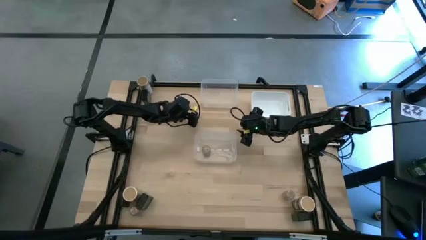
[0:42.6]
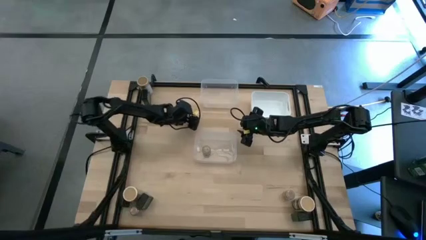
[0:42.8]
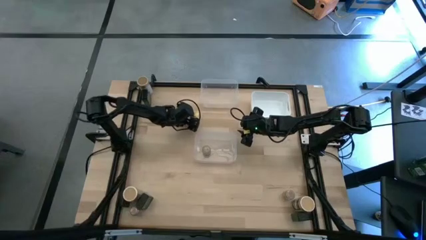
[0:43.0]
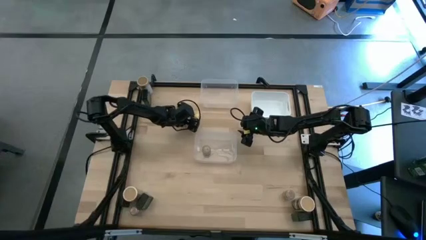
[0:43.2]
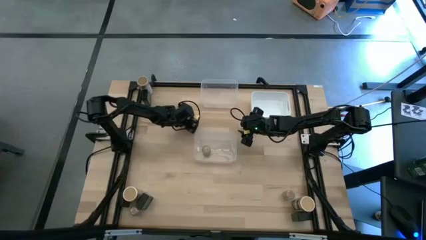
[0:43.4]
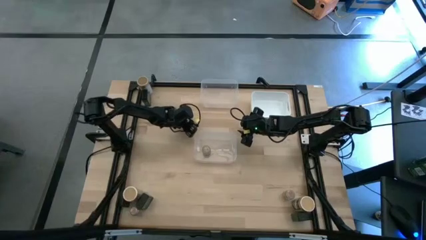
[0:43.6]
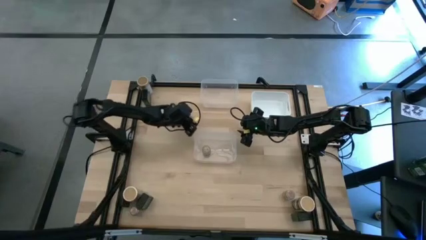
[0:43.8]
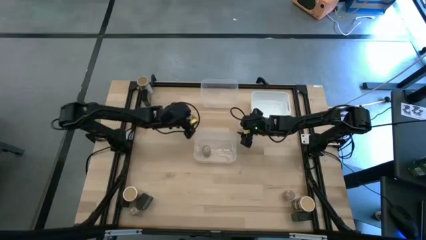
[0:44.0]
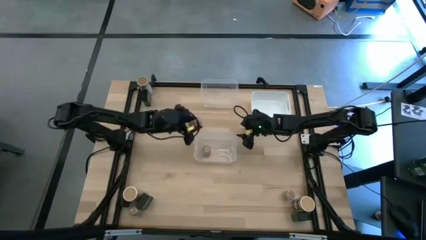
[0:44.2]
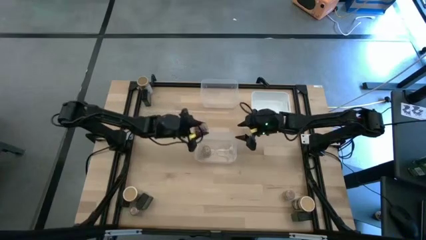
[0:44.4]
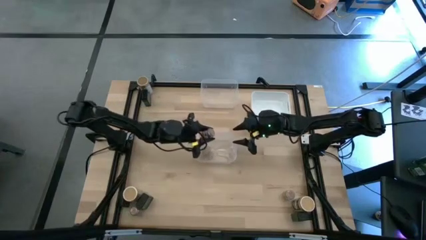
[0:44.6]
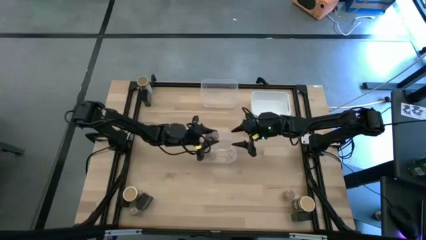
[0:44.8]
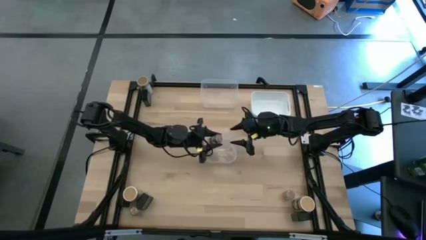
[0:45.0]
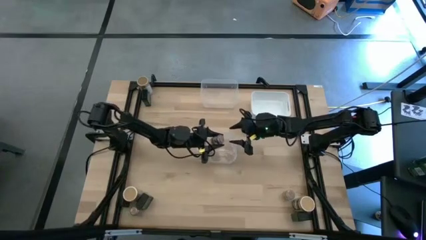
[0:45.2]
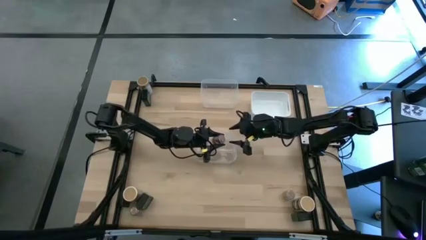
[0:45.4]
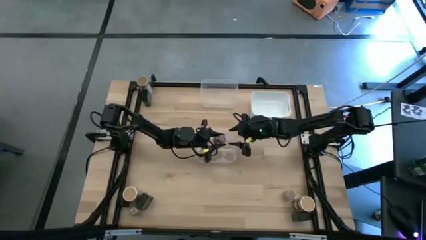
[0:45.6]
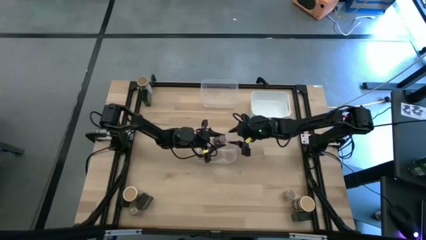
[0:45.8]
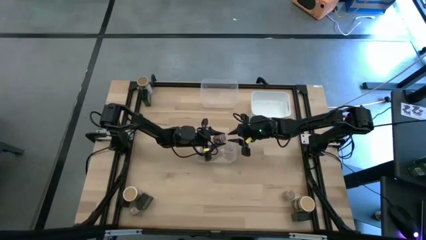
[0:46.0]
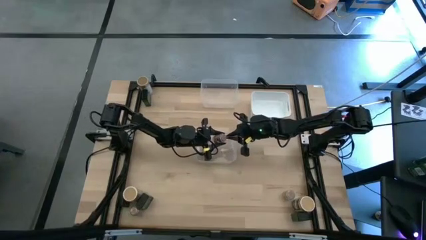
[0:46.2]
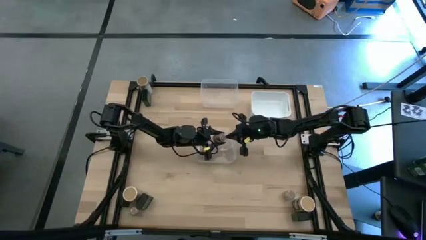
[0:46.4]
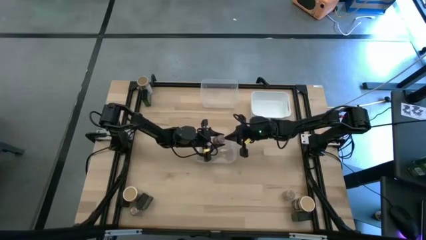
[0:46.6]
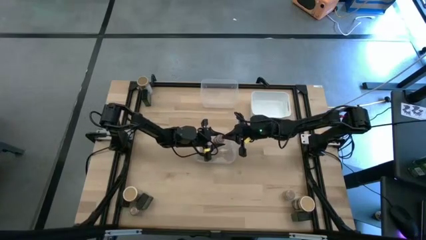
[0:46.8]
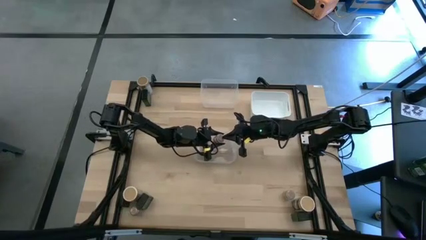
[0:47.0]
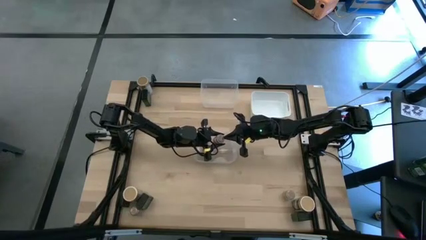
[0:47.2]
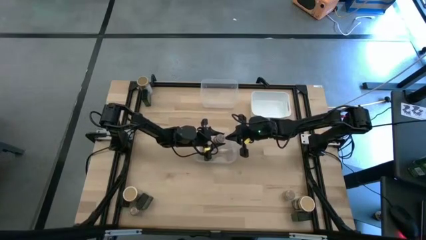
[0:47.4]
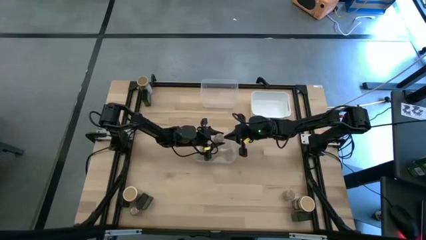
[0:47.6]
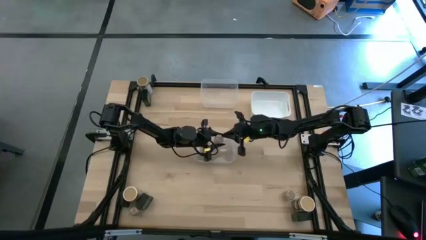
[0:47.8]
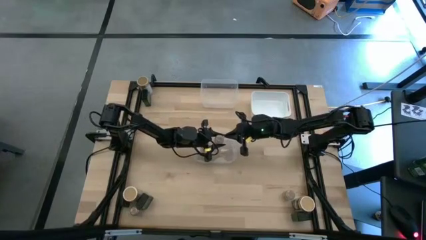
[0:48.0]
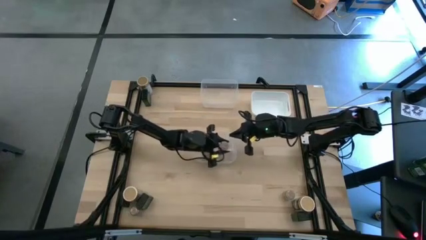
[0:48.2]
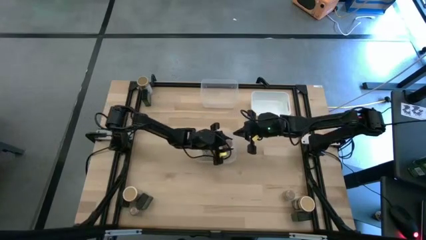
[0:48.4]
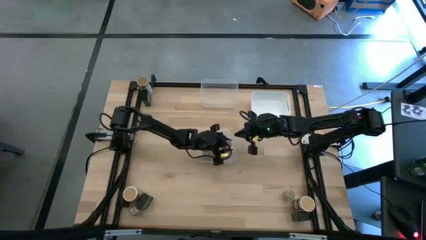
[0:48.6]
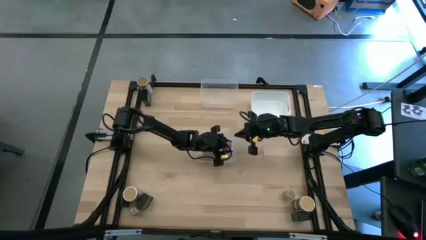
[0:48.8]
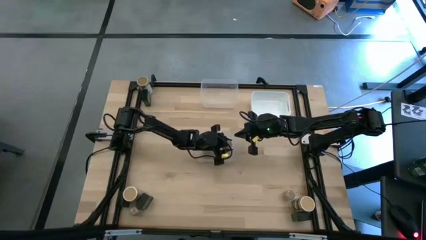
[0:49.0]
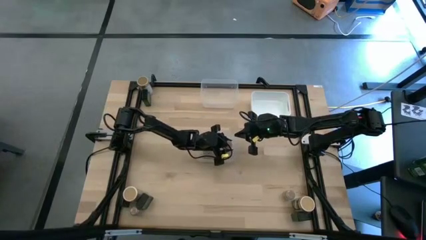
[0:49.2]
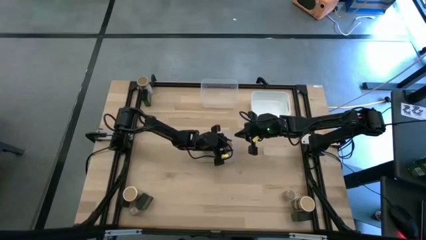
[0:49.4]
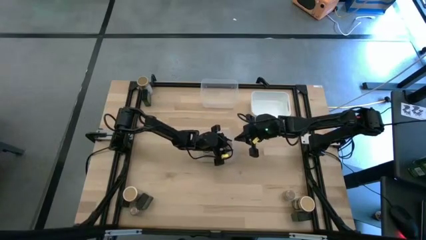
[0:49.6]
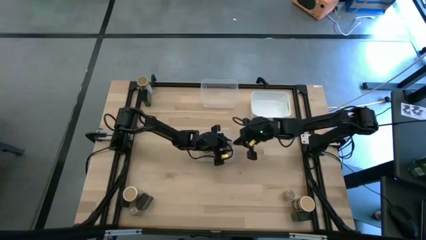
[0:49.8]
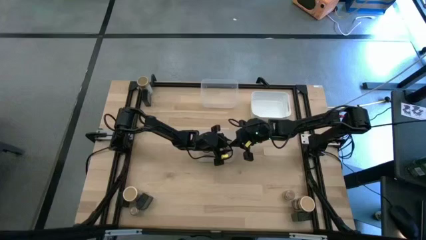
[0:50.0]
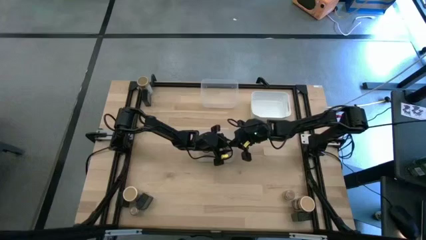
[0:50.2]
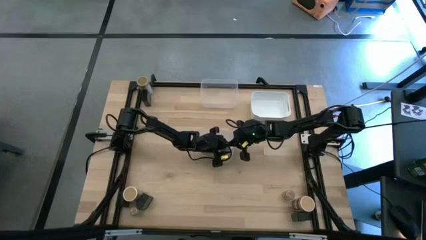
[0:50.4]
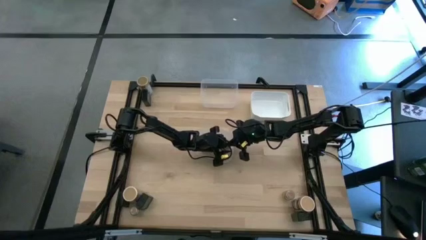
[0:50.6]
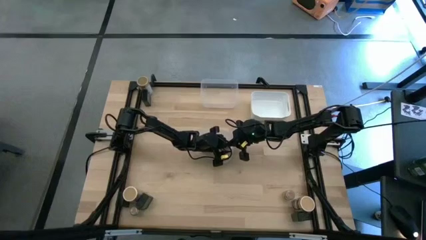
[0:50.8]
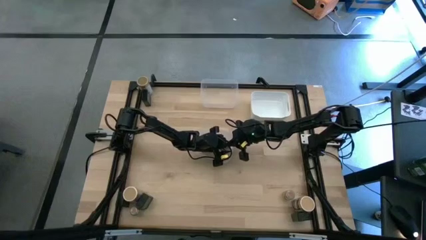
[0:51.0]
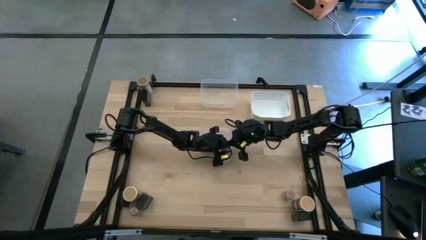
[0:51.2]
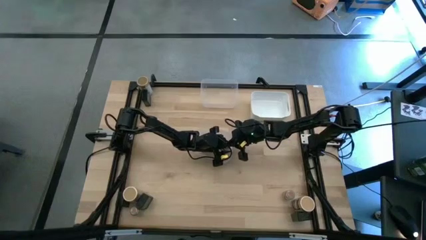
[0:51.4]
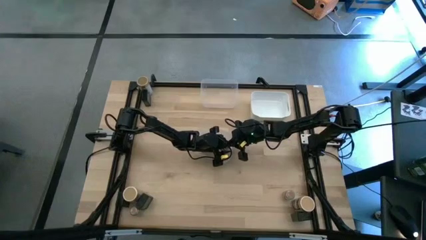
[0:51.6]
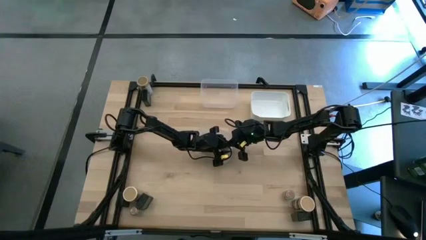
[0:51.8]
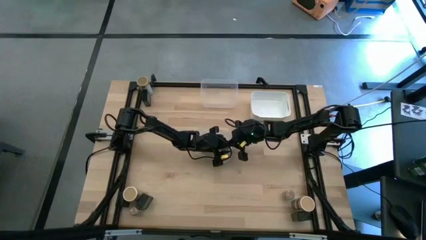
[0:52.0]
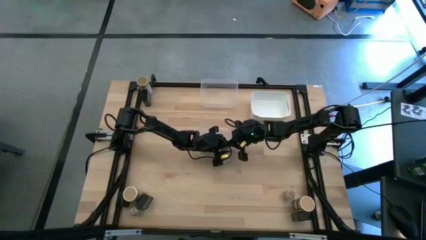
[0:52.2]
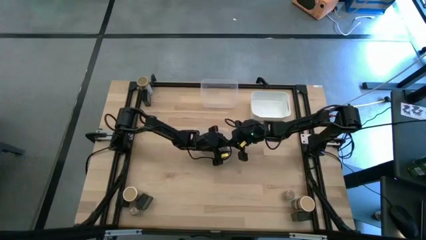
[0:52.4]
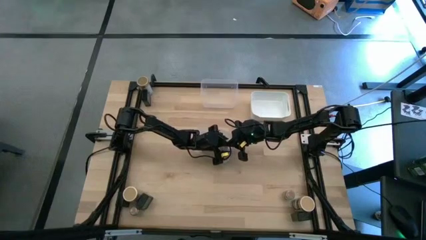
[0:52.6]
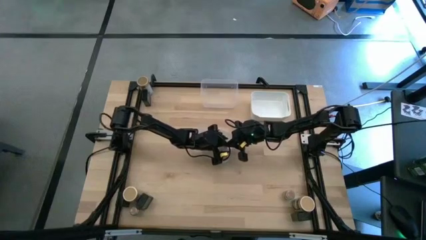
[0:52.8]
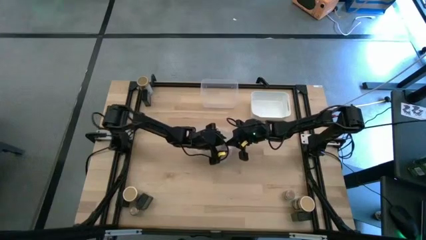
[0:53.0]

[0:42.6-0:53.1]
Task: Sort spices by type
Put the top left transparent seasoning bottle into the bottom transparent bin

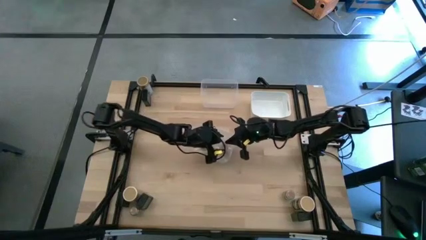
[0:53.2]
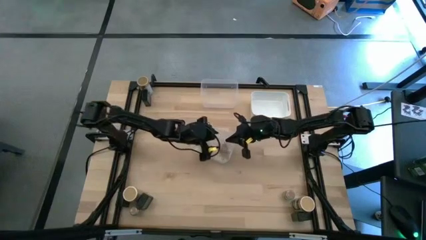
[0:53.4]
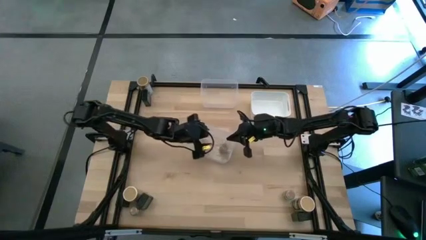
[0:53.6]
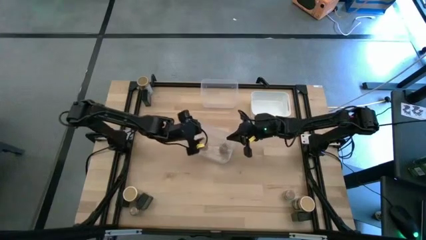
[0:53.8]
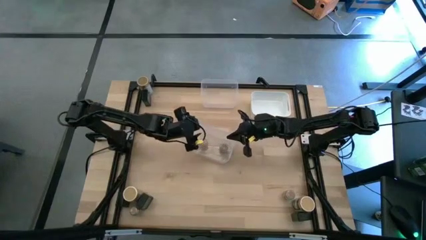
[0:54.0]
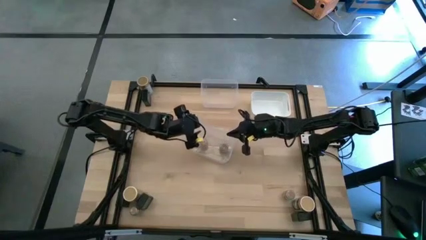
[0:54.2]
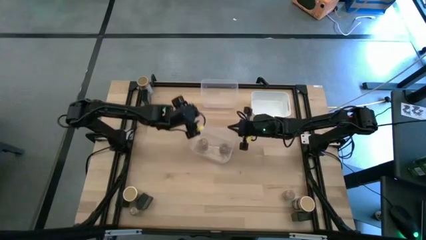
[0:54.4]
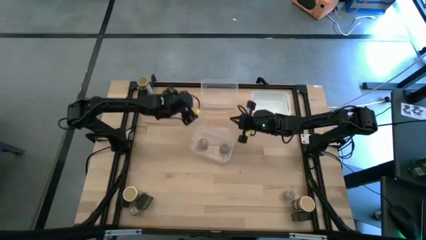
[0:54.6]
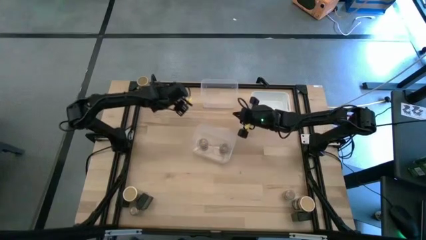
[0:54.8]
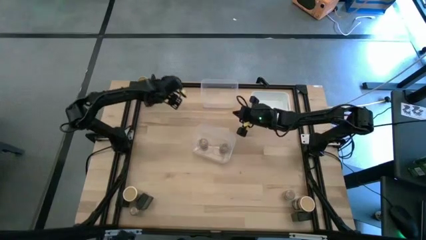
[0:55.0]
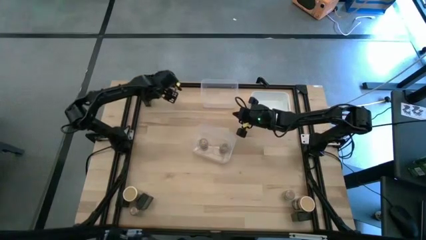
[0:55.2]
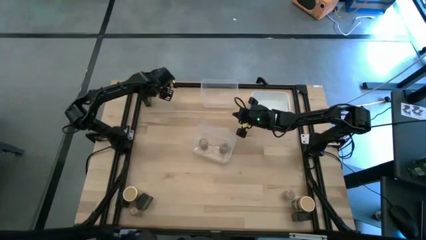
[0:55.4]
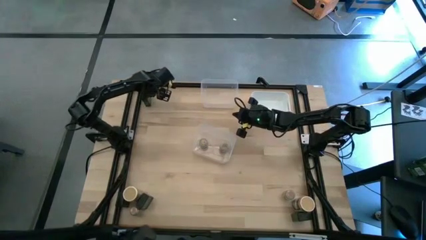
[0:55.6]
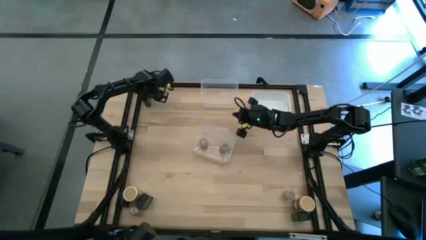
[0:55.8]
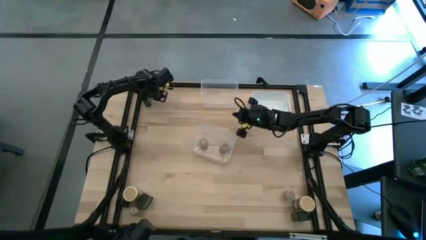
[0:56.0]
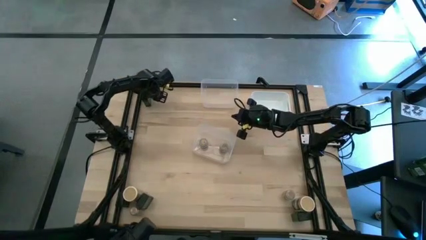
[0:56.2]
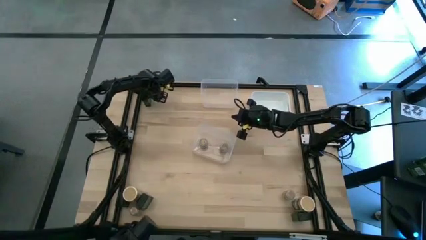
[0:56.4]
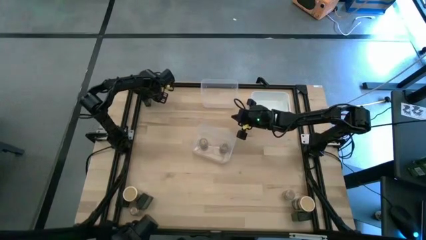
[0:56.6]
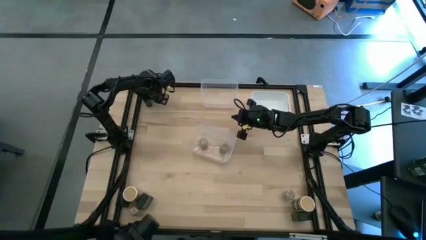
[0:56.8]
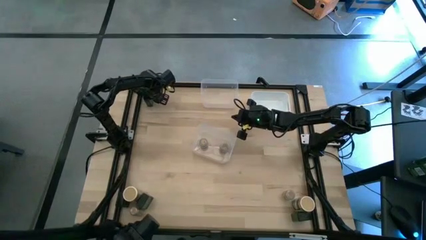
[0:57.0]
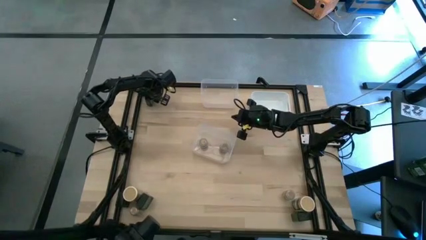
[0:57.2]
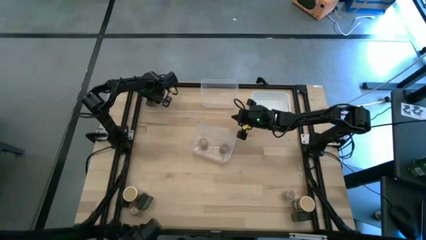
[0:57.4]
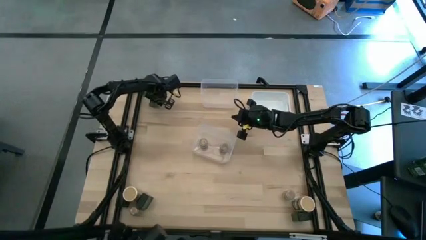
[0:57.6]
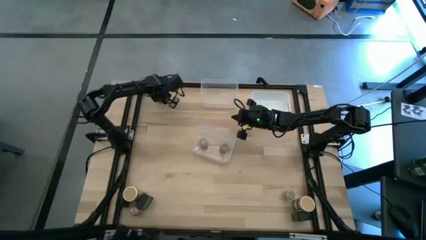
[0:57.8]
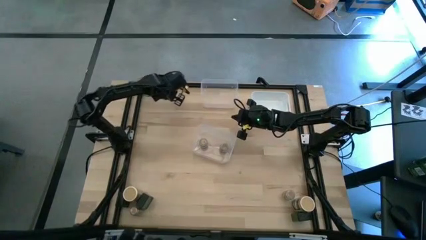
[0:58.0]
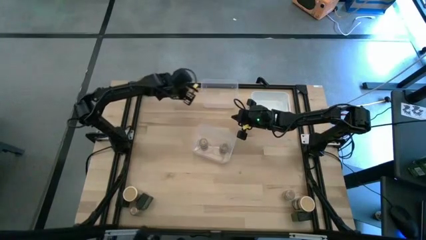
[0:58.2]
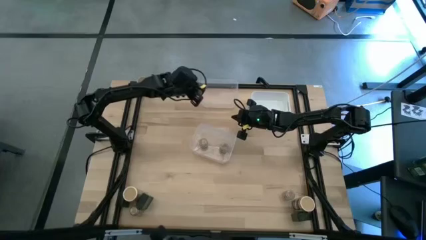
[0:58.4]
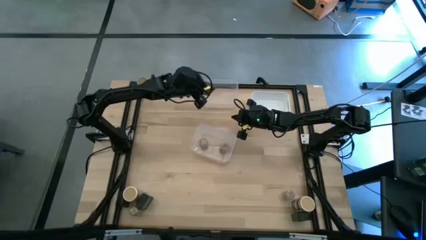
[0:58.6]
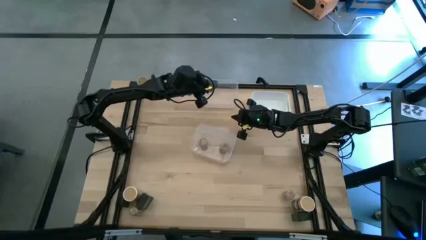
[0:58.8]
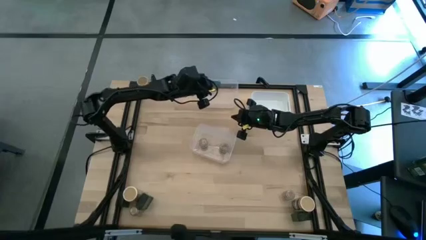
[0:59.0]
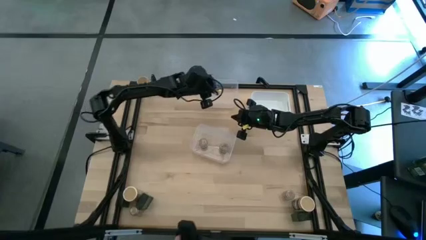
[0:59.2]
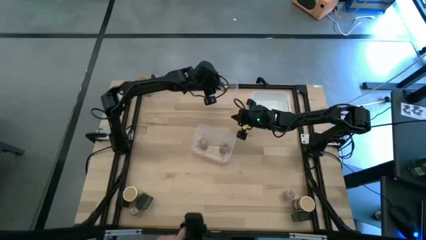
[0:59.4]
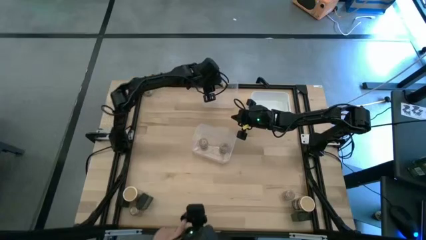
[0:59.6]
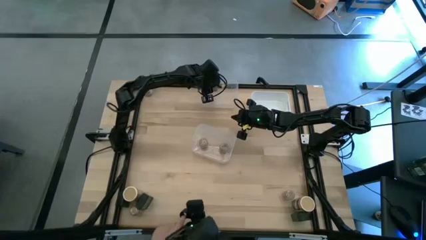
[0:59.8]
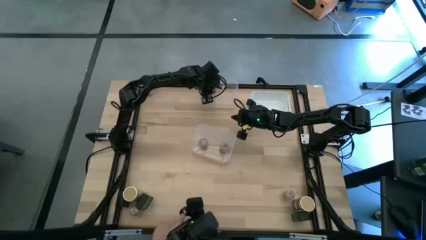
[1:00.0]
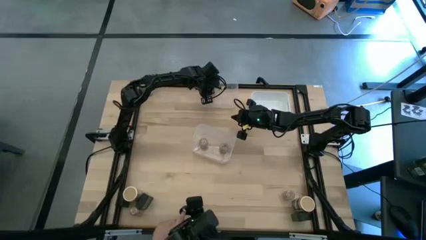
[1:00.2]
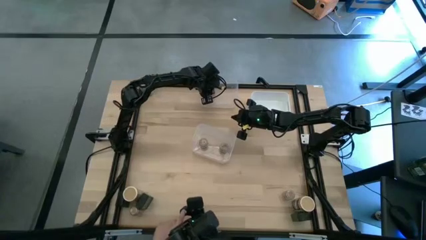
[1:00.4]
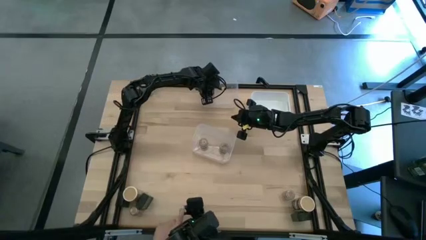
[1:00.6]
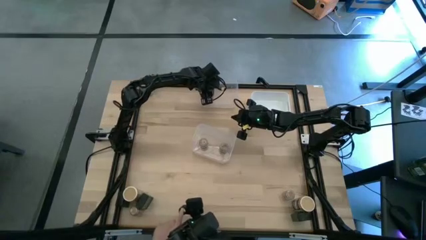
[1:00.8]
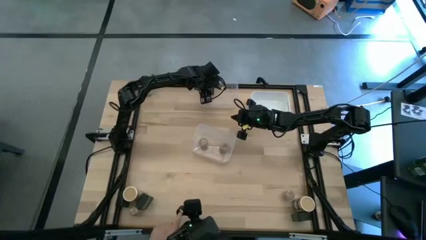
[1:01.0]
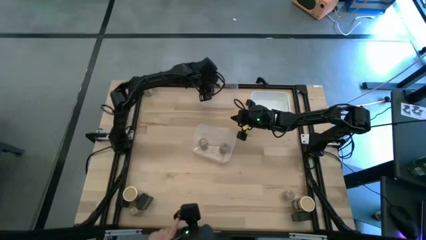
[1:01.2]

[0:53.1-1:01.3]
Put the top left black seasoning can into the top transparent bin
